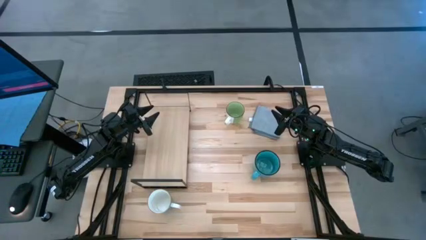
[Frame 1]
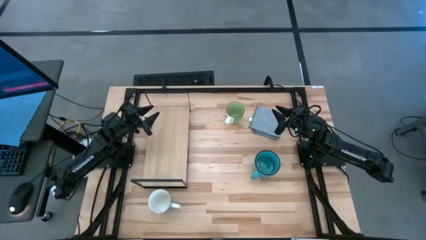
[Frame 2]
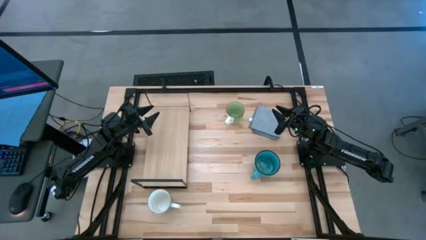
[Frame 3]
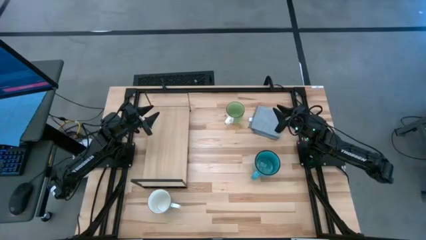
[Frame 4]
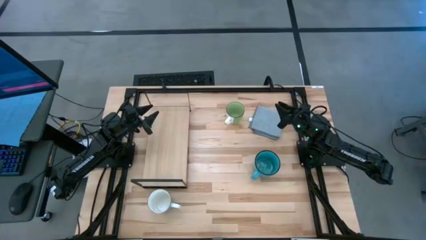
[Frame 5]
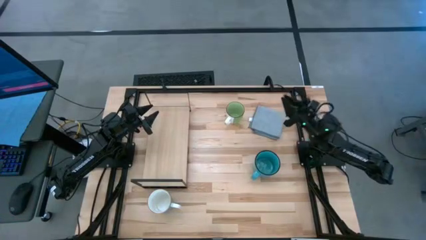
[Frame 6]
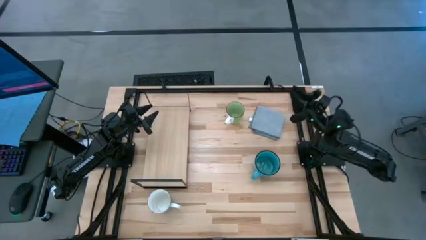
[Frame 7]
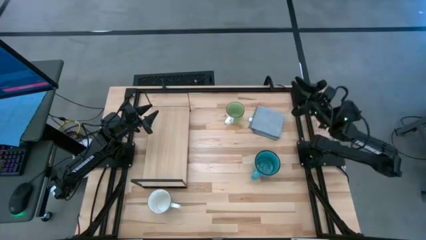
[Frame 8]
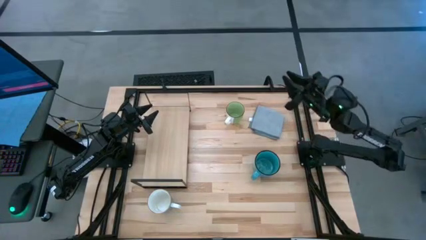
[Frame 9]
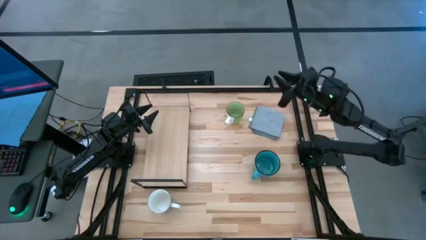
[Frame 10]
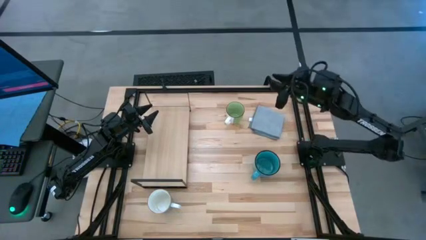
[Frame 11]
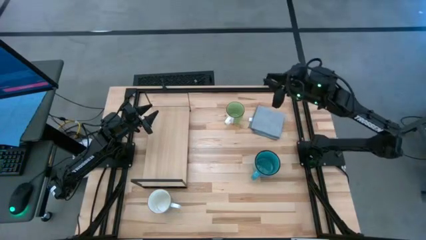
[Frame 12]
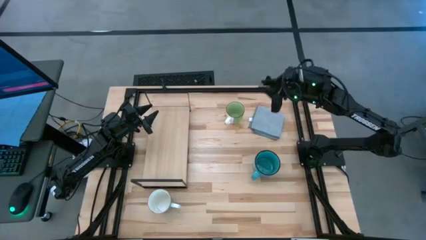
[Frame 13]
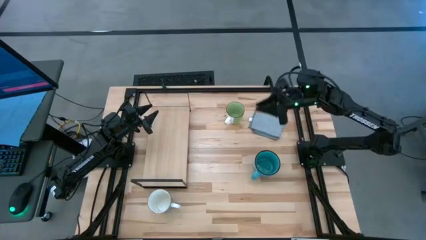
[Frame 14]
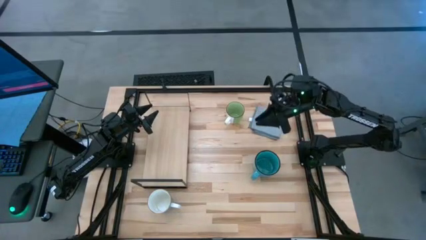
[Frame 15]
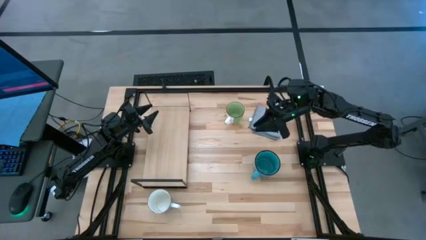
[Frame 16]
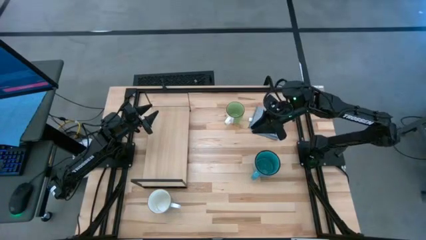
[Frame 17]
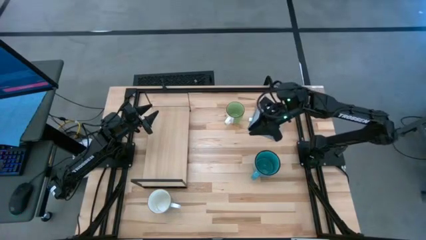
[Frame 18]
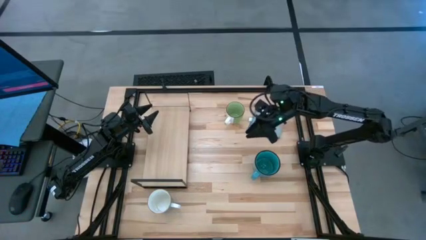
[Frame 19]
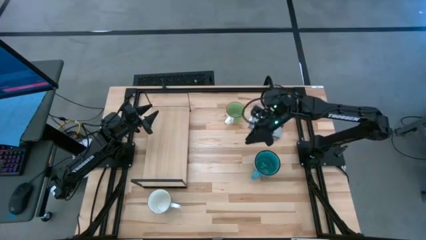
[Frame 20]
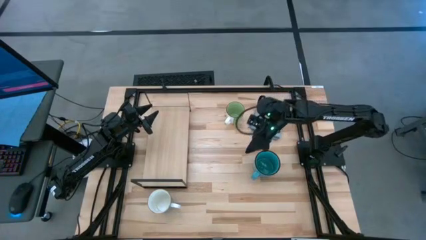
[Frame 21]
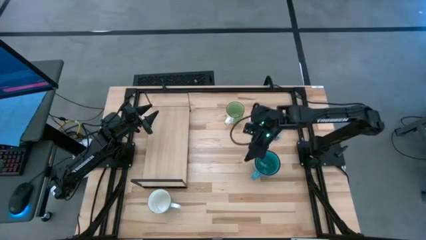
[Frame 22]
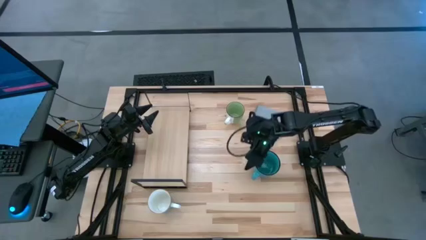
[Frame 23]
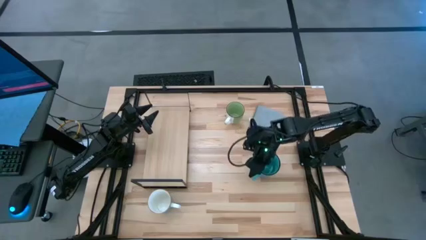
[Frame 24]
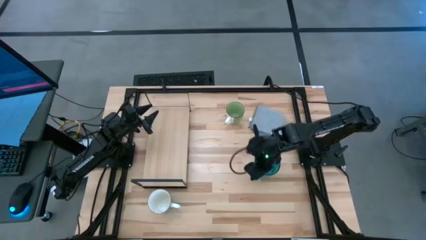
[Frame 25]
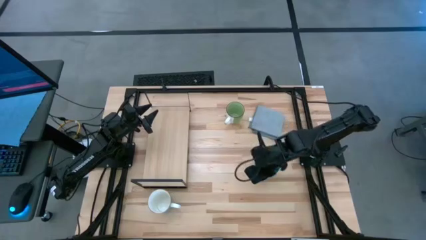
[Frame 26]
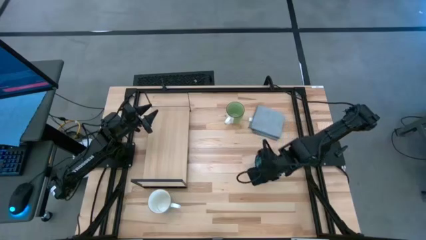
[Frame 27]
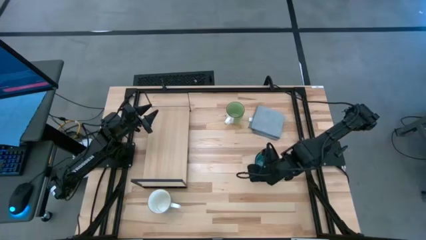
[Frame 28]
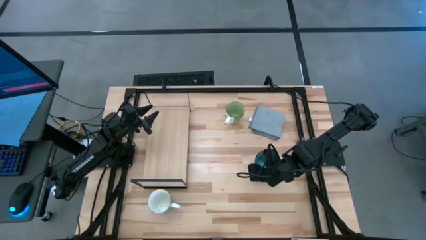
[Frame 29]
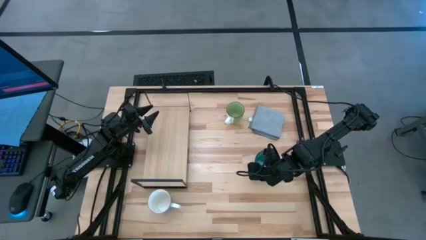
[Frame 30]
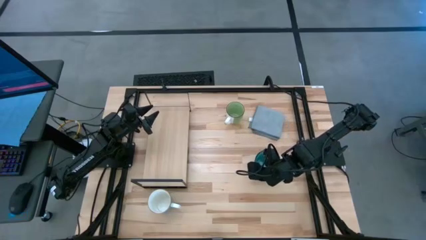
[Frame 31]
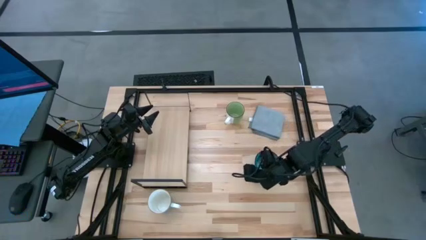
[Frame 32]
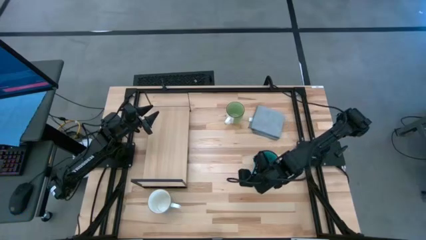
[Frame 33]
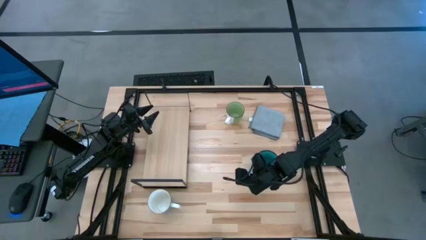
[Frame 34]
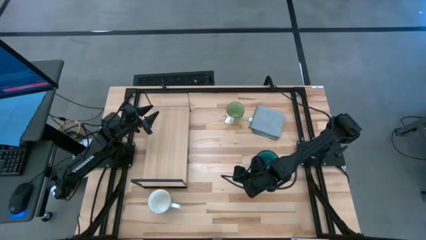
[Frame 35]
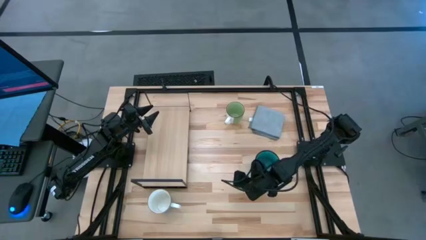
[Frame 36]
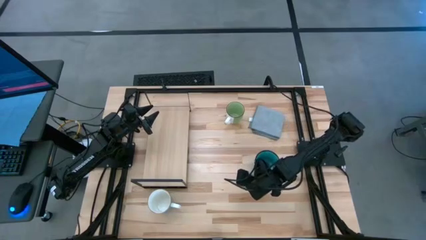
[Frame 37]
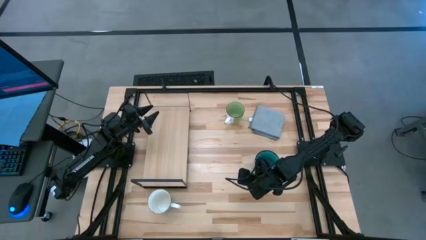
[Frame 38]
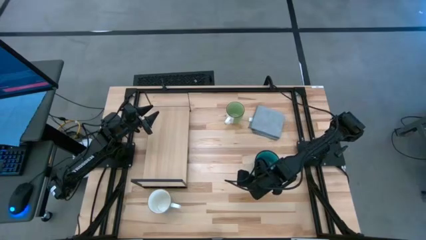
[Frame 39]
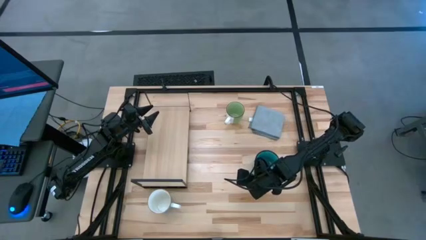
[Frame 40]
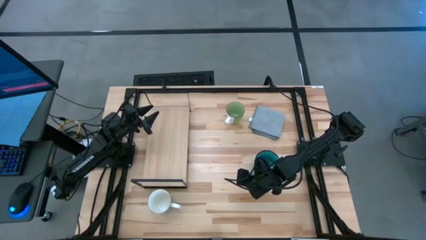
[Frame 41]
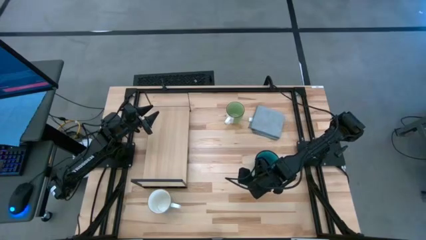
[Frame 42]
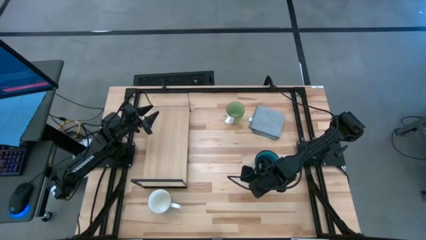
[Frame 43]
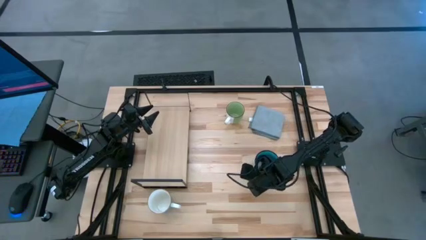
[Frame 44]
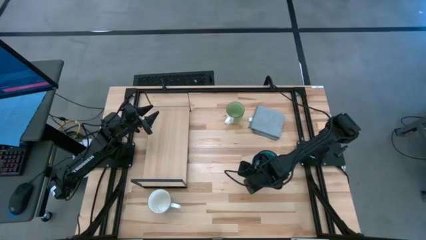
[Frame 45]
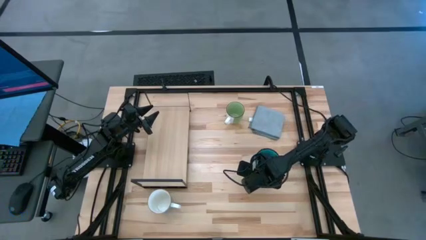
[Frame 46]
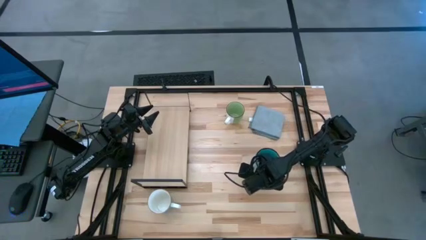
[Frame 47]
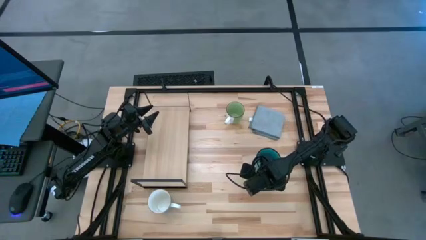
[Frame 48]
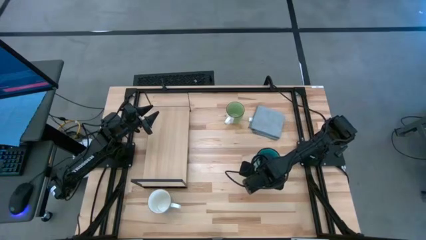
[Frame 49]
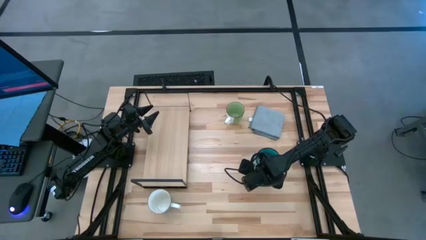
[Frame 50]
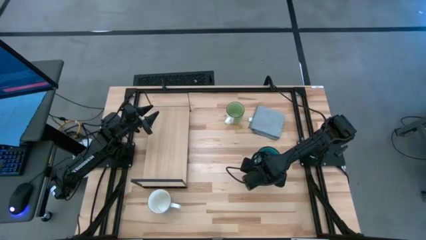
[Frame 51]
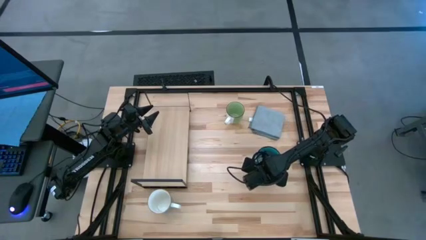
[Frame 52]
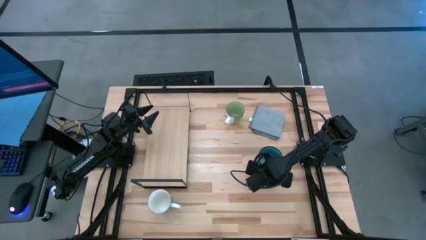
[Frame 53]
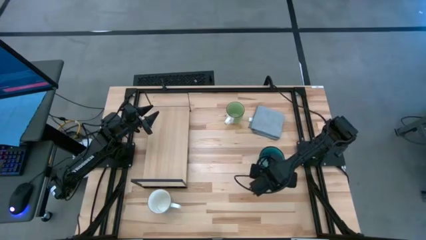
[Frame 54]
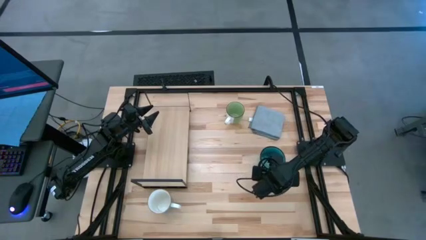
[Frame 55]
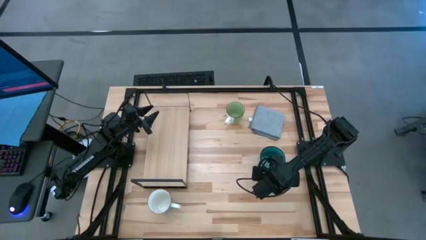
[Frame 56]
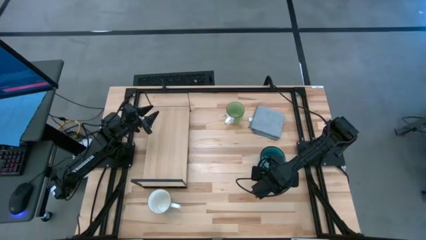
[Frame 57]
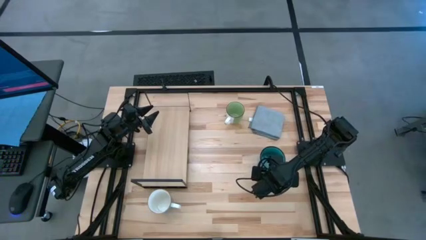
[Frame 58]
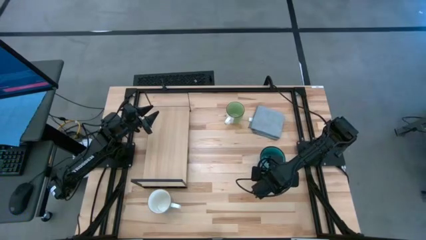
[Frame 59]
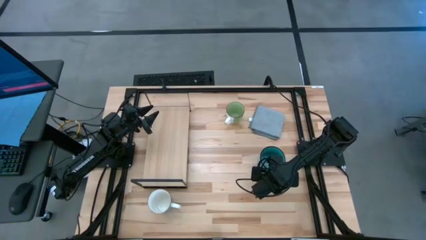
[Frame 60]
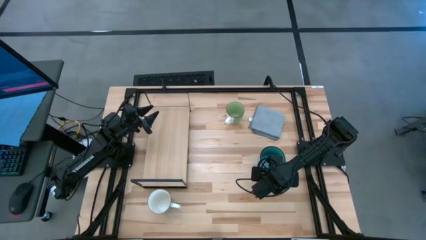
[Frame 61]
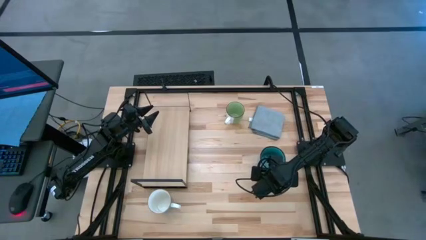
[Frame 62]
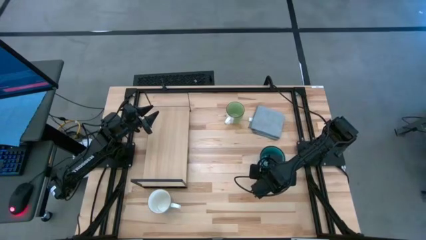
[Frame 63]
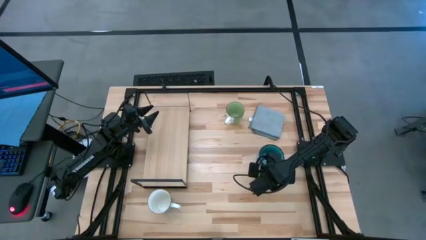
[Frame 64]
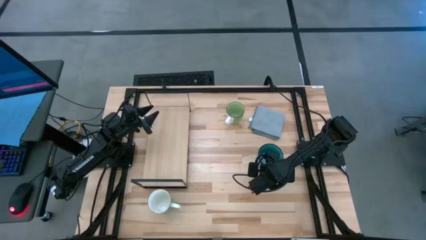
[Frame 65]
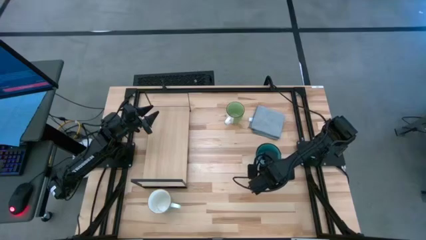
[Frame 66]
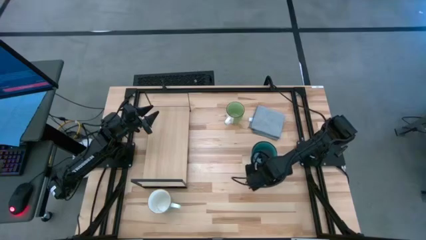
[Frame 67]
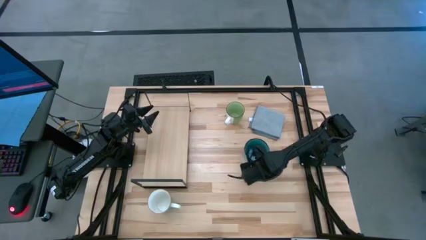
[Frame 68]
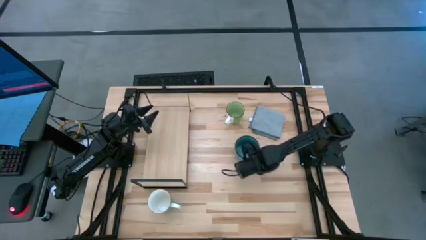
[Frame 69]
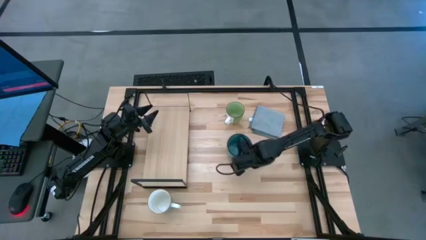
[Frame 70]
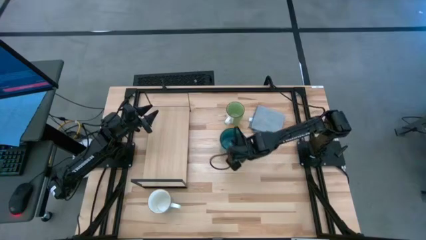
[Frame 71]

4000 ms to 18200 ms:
Task: Stack small to large cups/mugs on shelf
Put the blue mug on the shelf
